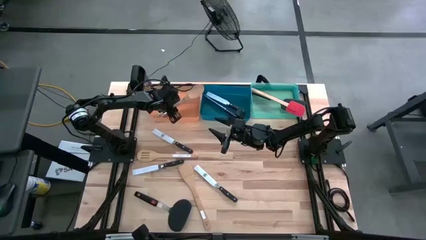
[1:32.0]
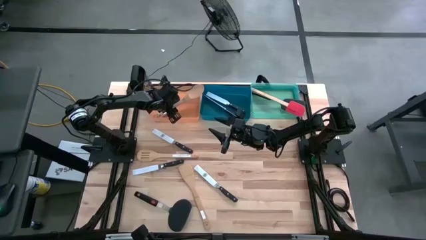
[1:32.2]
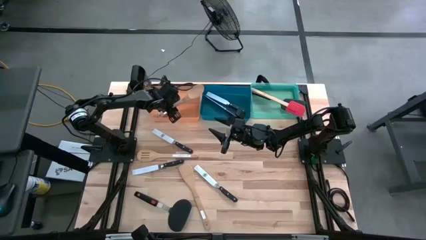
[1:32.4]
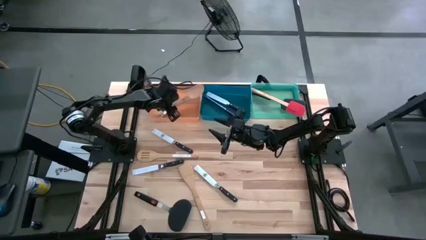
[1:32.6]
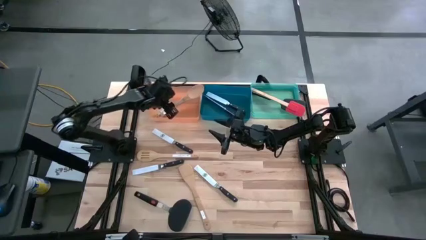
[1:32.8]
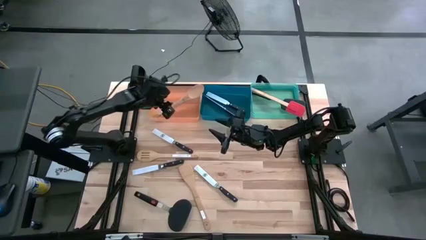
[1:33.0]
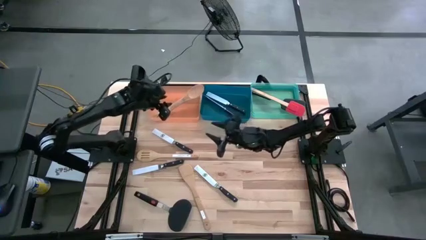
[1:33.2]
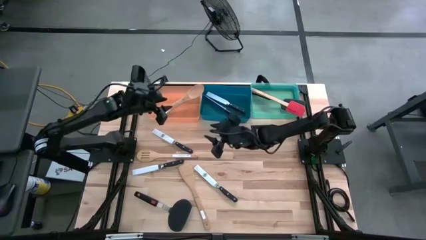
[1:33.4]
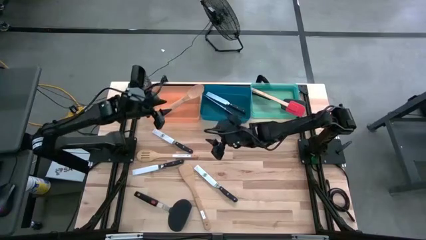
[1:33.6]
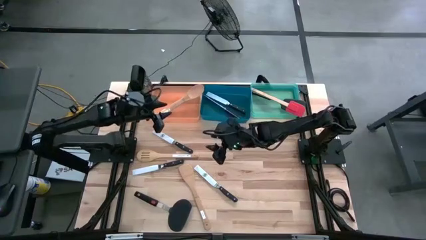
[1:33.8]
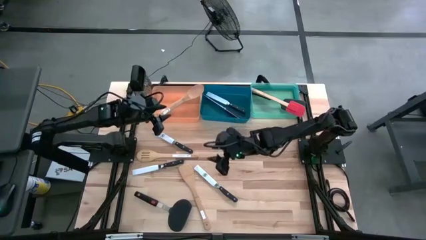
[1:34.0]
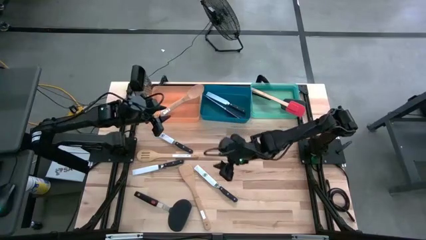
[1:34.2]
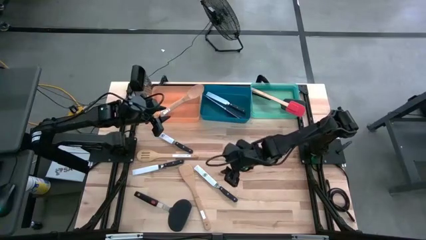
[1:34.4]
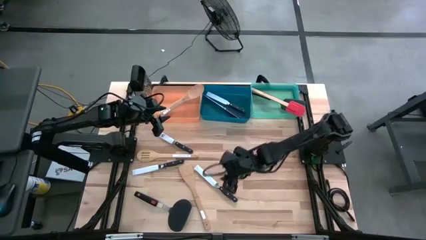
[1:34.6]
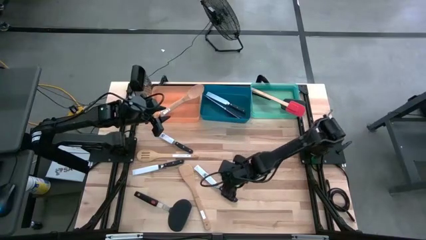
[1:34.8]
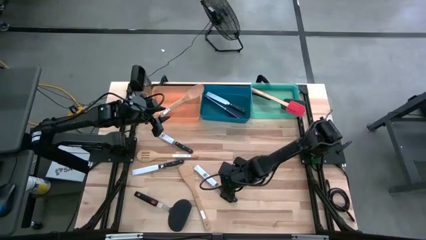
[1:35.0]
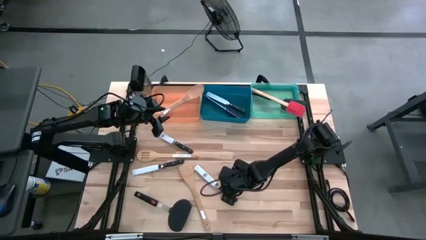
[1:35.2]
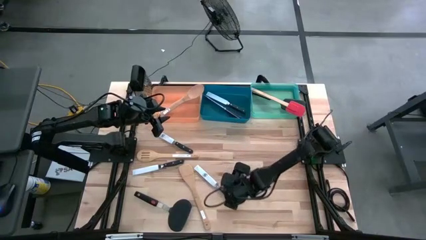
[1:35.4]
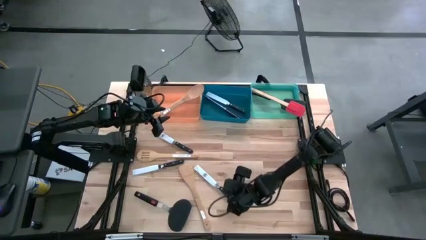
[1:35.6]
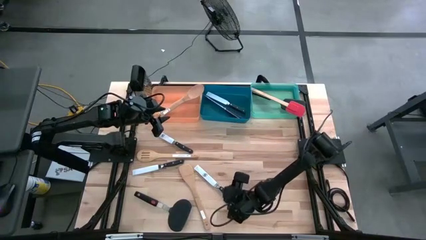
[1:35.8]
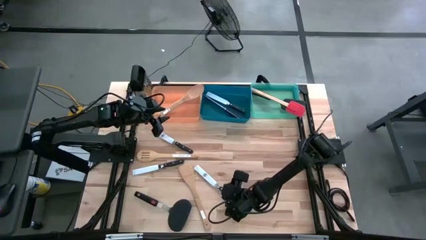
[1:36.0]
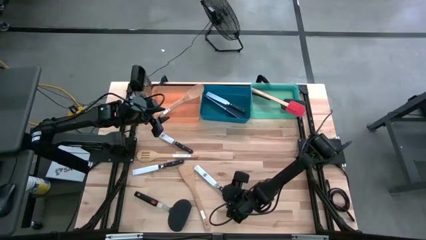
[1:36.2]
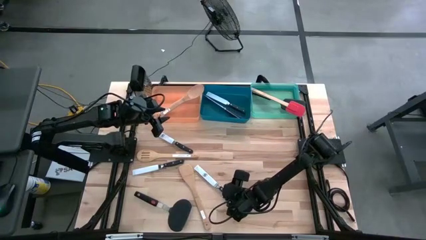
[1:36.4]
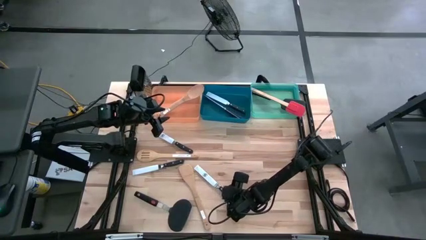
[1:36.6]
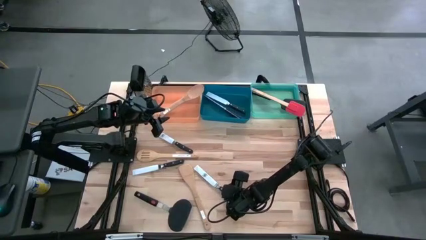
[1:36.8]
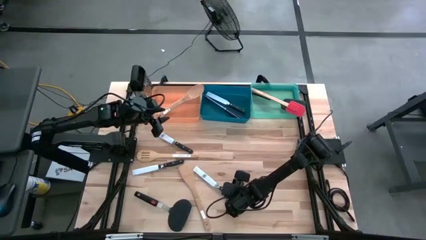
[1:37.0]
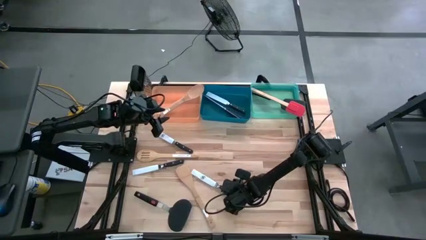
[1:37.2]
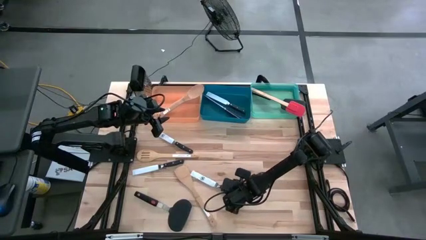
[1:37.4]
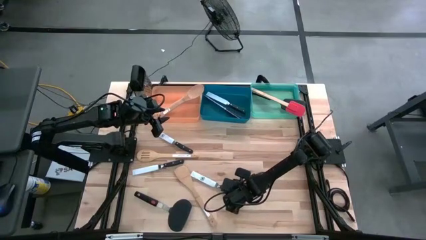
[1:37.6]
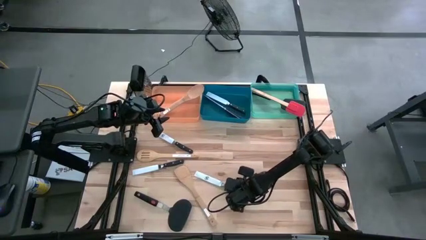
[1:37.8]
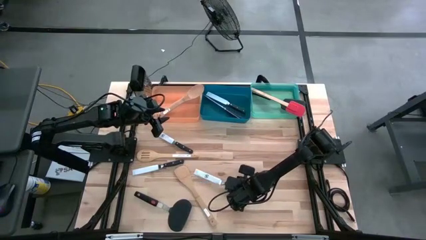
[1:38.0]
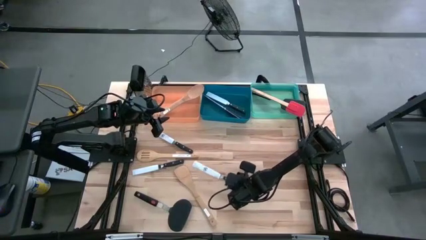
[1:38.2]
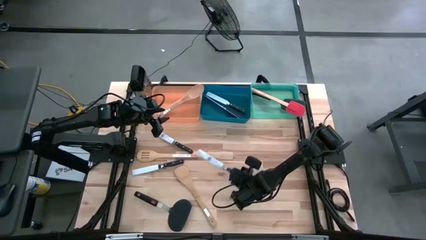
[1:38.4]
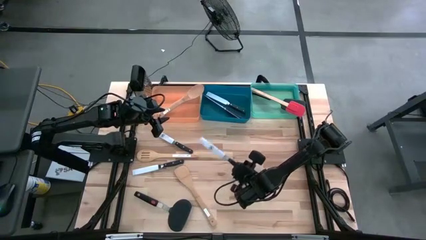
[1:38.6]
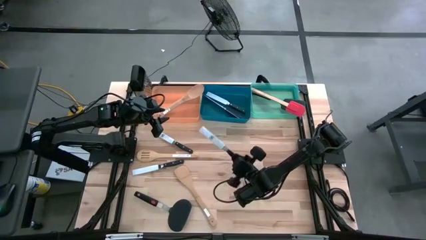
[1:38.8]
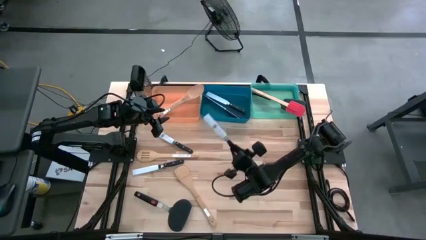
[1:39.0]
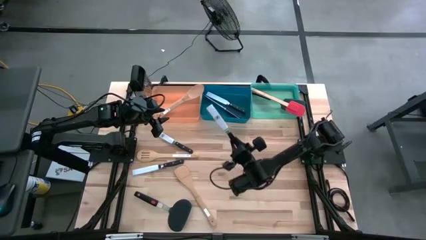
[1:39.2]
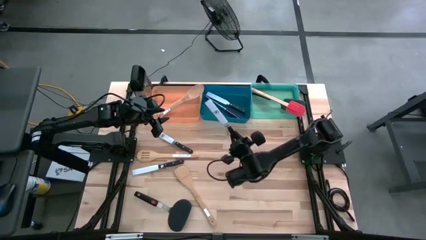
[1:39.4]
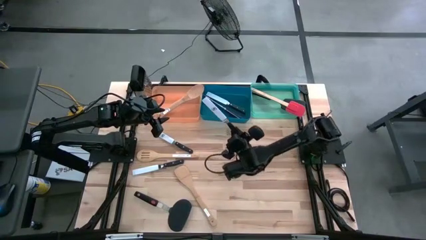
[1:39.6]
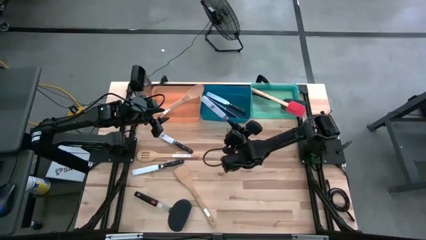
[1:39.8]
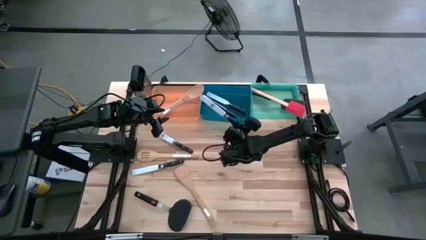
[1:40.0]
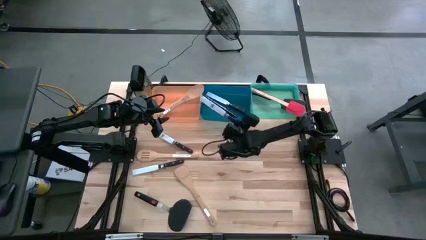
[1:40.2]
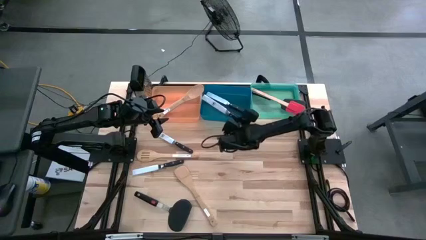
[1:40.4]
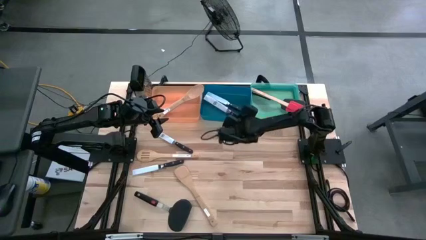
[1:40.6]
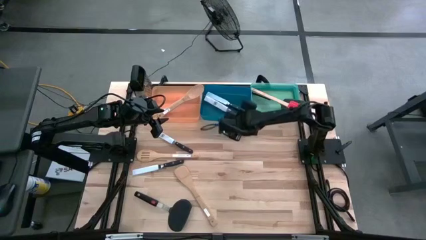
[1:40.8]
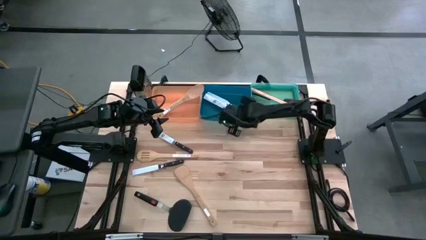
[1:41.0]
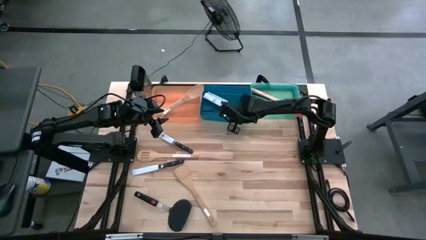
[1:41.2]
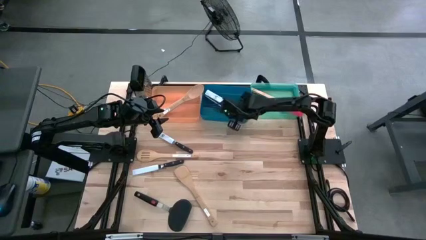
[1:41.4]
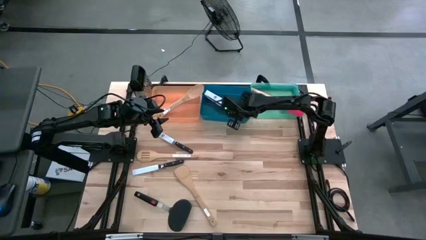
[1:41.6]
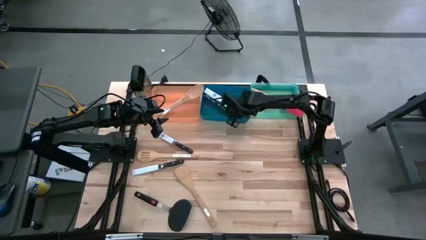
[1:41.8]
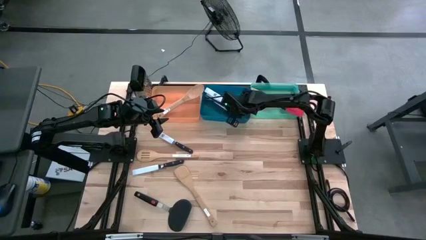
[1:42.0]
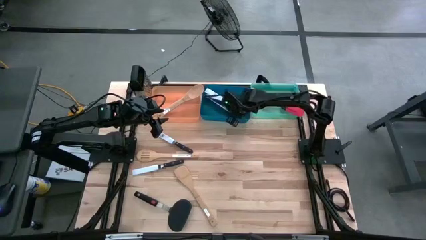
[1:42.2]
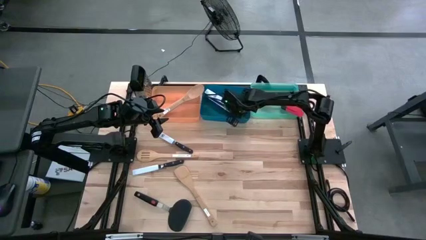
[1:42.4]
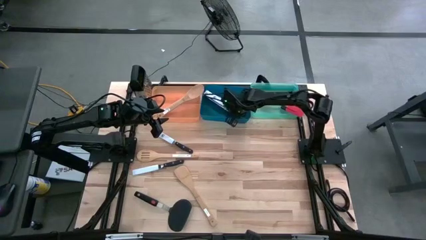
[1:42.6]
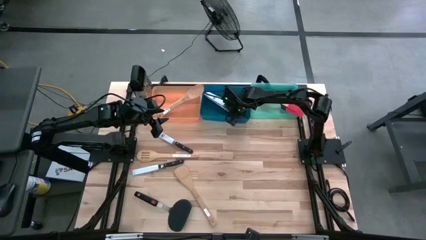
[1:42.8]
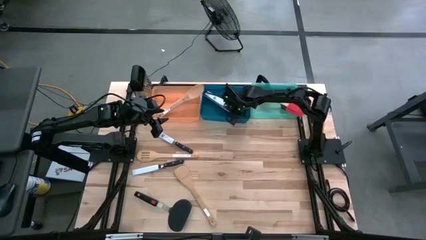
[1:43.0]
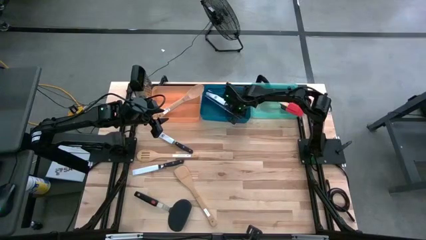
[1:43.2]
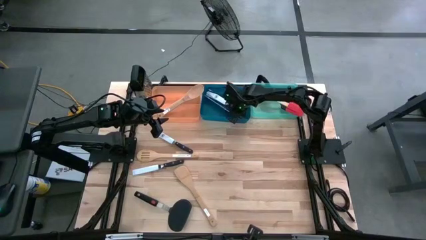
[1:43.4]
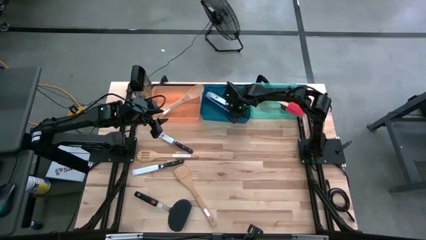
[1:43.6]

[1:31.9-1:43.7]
Task: Pick & Place Kitchen Items
Put the knife into the blue bin

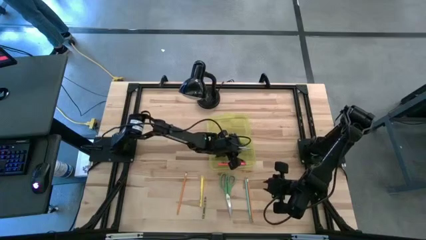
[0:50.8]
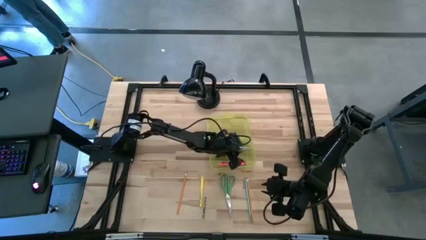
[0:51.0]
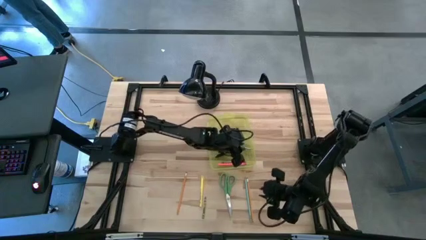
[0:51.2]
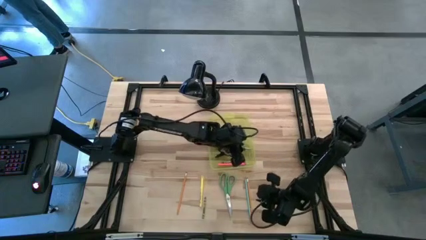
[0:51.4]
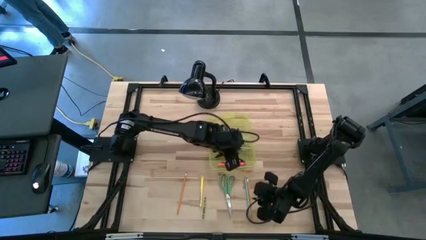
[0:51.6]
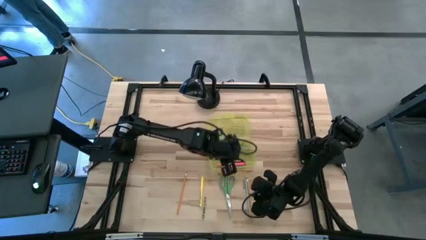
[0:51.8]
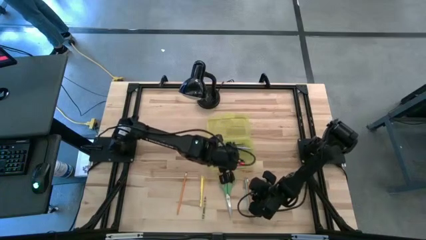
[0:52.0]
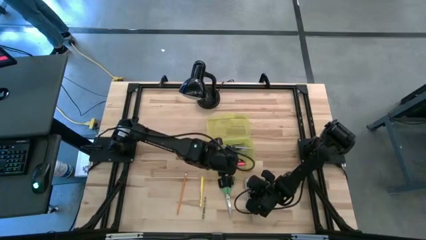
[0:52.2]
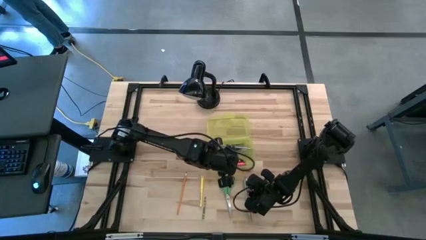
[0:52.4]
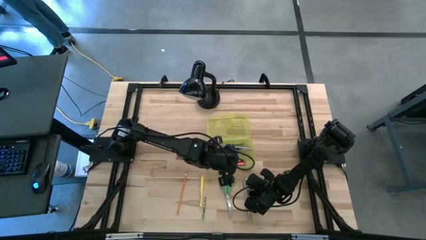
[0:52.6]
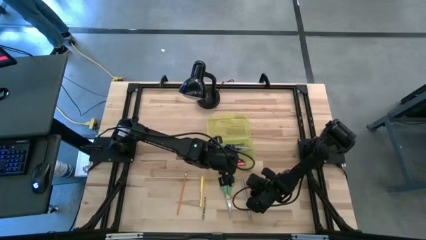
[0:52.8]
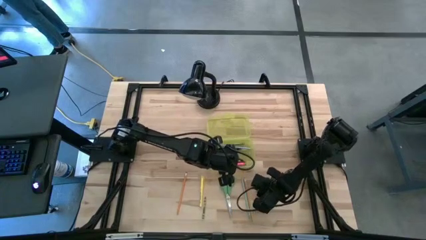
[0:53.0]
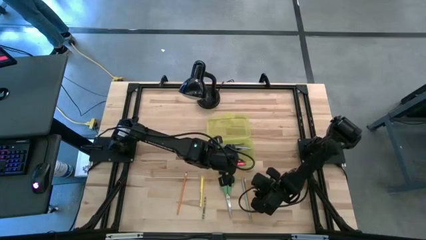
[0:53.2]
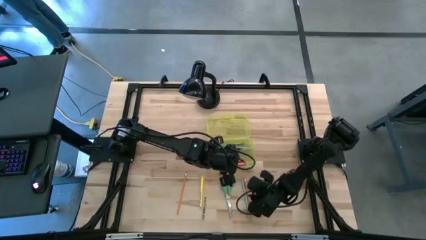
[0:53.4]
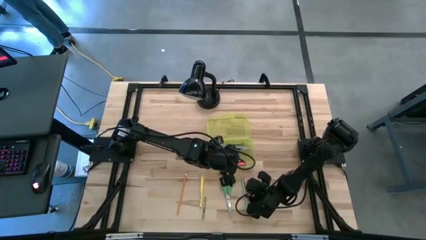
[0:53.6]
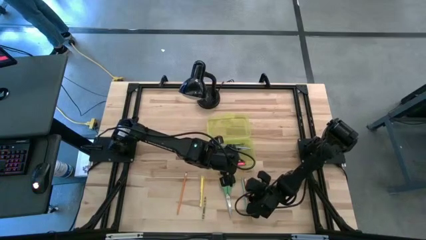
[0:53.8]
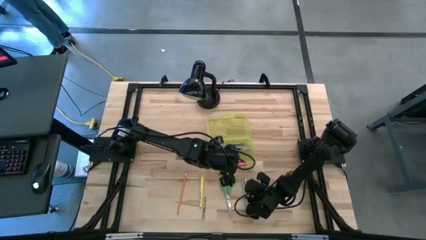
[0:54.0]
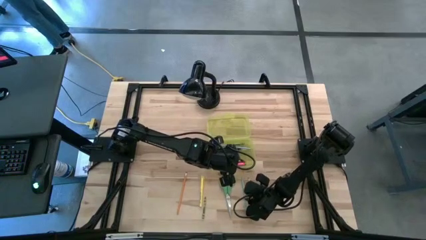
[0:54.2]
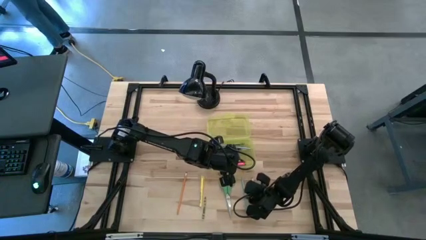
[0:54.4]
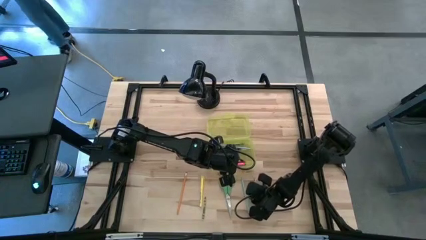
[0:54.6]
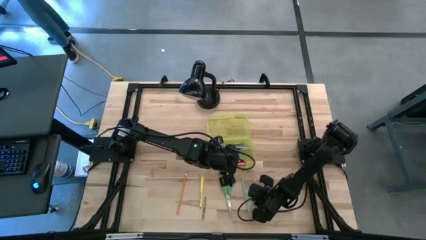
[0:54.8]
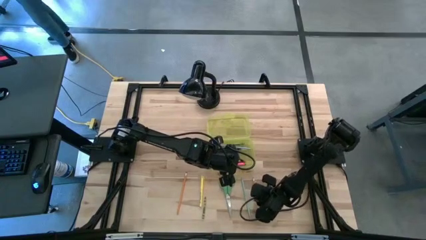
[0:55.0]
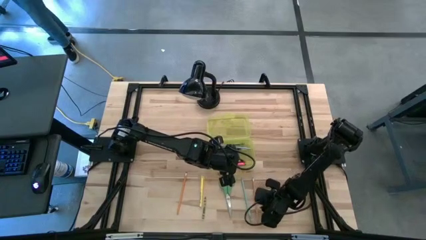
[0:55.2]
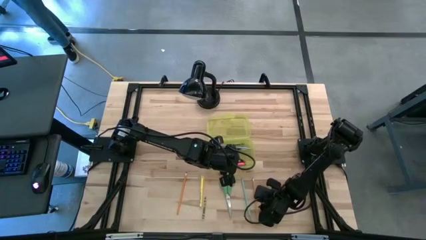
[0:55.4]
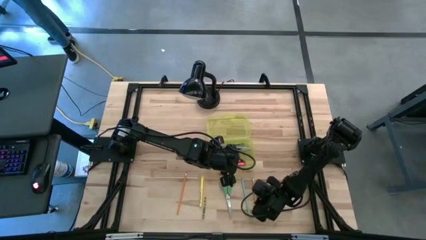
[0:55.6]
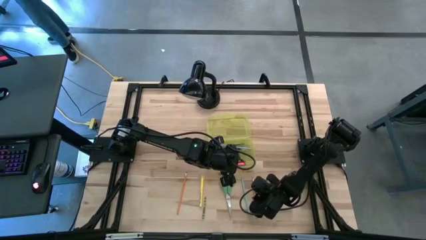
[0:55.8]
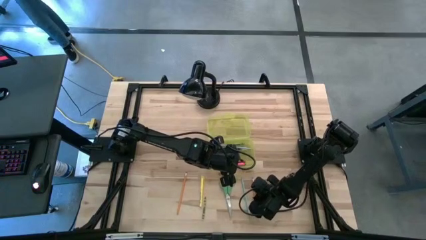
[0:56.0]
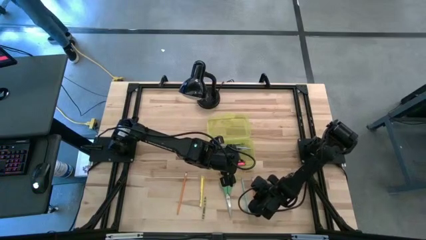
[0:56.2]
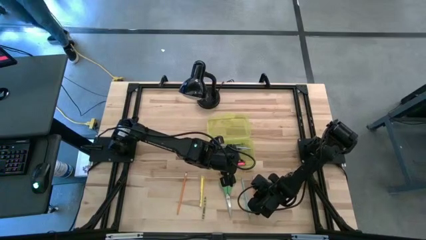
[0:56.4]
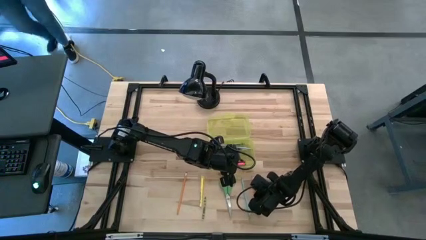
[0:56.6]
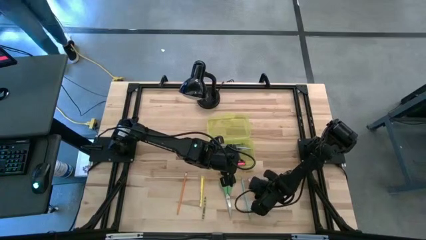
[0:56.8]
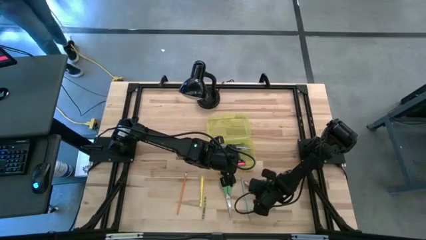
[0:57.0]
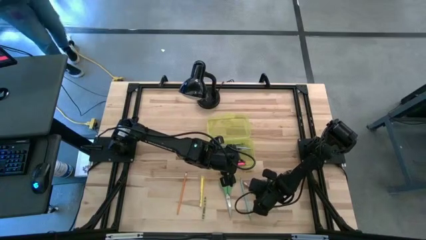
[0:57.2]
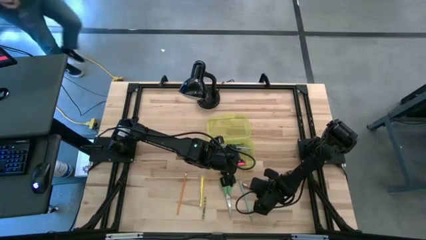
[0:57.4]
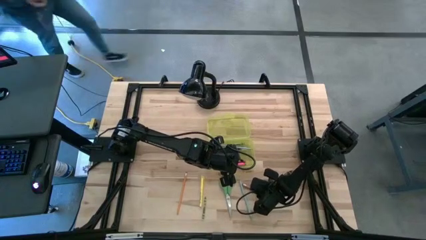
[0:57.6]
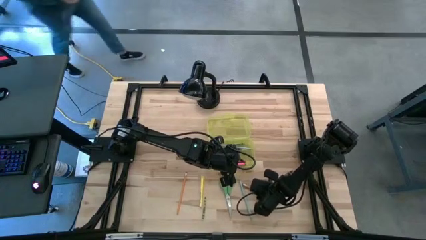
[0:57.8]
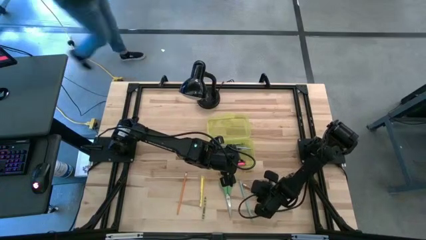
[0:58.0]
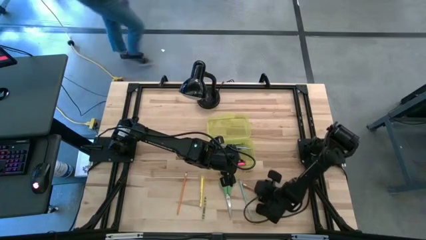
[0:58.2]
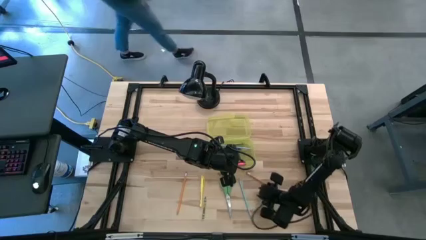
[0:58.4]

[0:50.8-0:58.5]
Task: Pick & place school supplies into a supply box
Put the right yellow pencil into the yellow supply box
